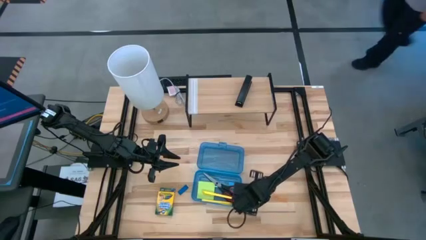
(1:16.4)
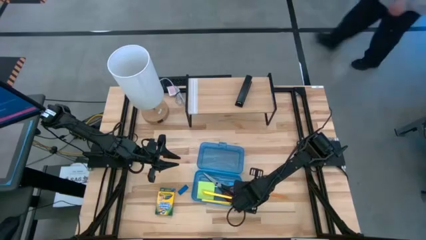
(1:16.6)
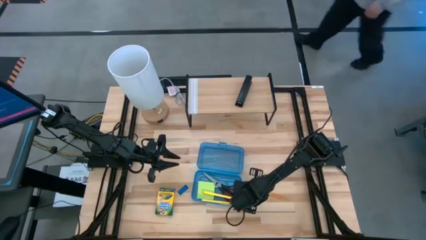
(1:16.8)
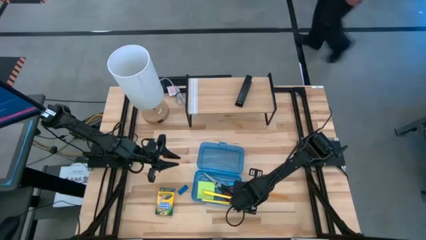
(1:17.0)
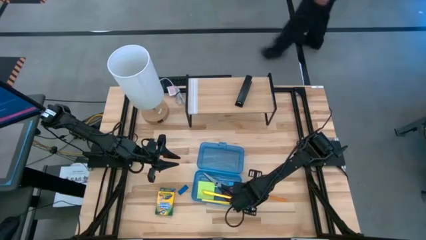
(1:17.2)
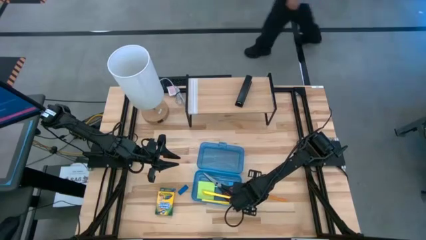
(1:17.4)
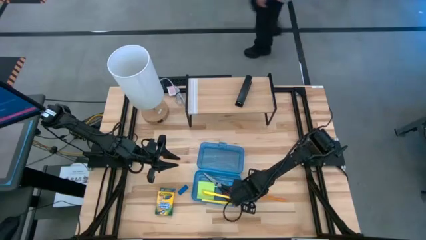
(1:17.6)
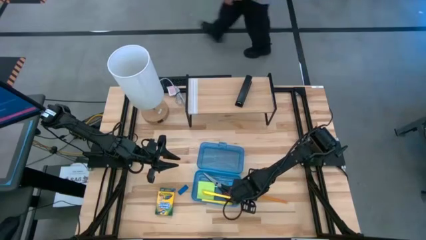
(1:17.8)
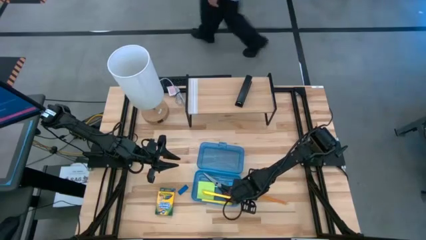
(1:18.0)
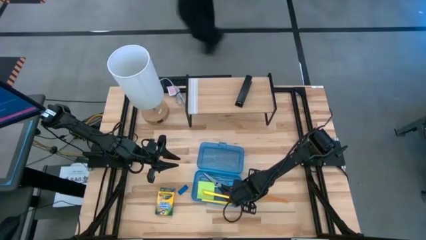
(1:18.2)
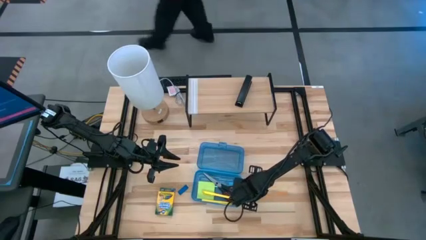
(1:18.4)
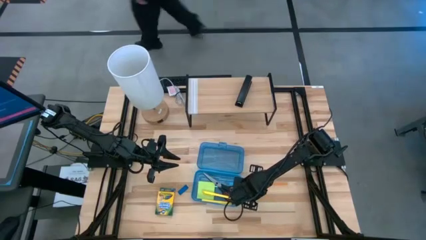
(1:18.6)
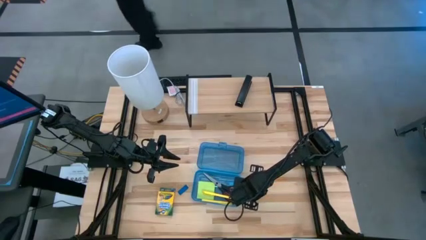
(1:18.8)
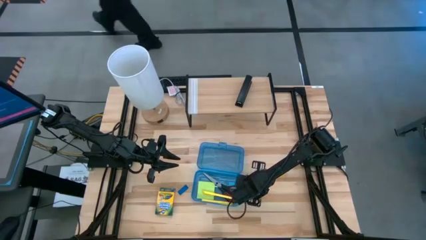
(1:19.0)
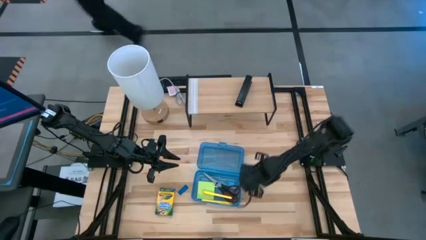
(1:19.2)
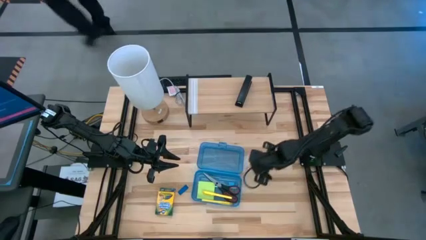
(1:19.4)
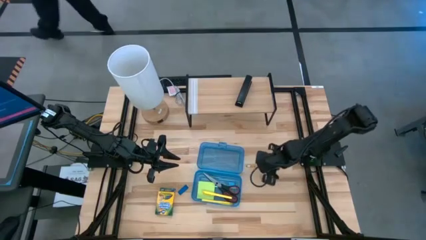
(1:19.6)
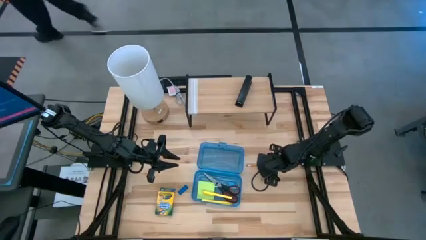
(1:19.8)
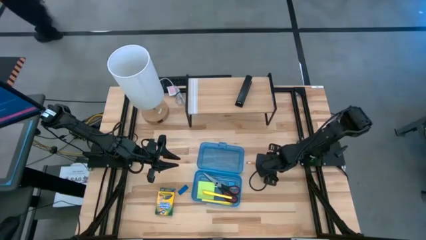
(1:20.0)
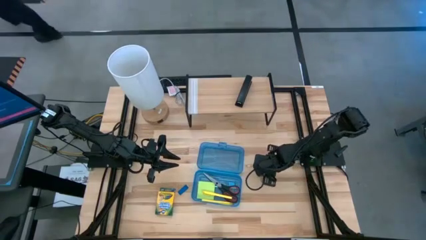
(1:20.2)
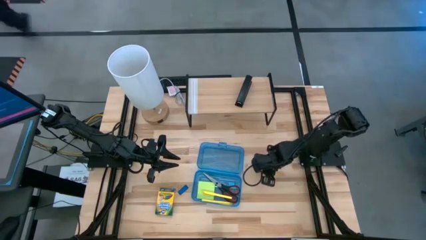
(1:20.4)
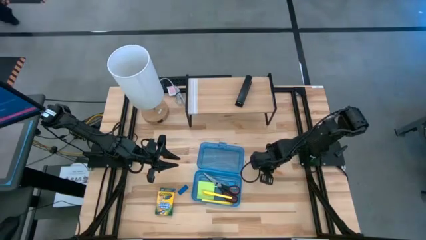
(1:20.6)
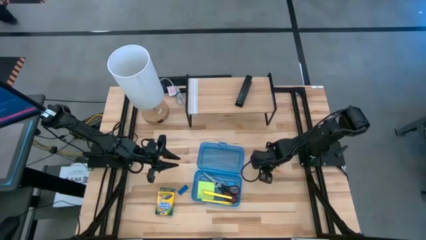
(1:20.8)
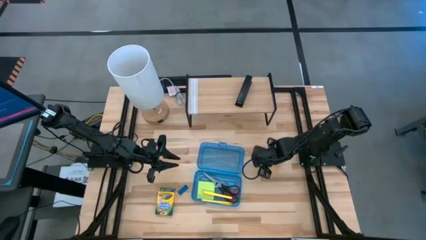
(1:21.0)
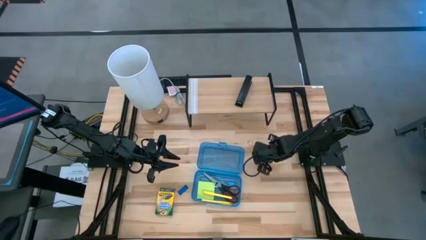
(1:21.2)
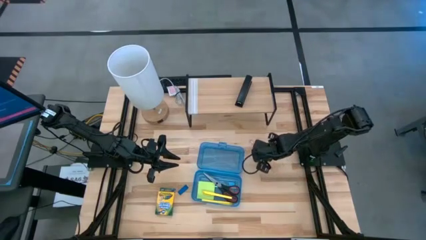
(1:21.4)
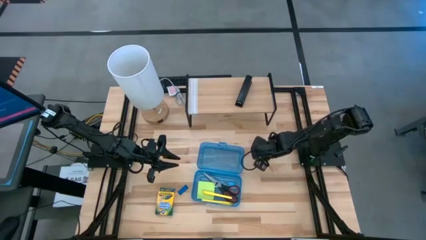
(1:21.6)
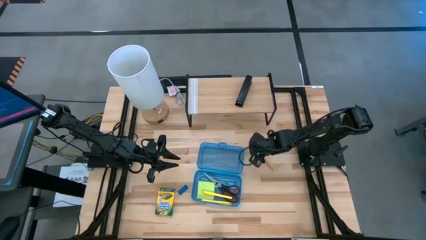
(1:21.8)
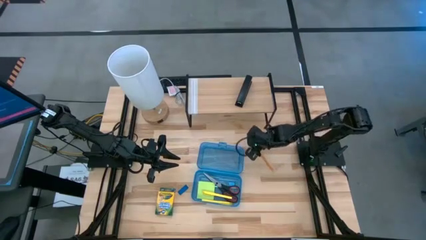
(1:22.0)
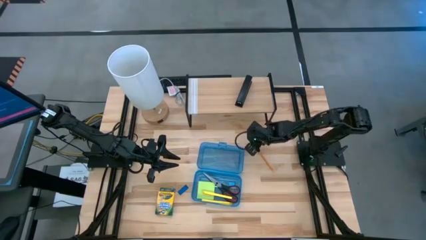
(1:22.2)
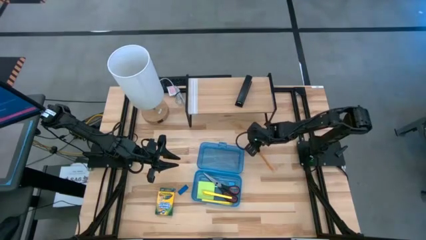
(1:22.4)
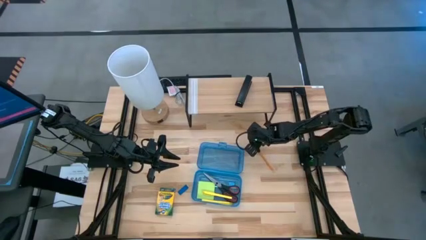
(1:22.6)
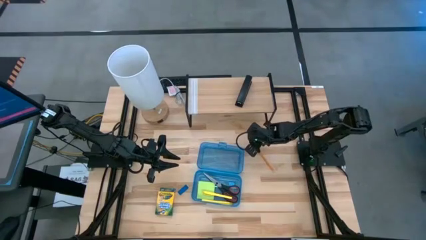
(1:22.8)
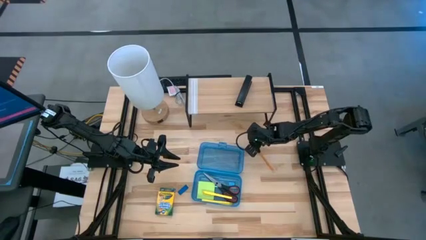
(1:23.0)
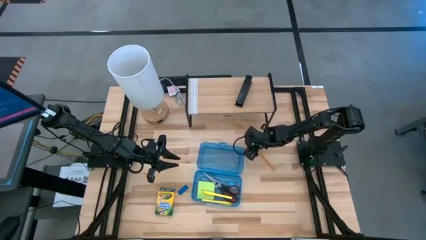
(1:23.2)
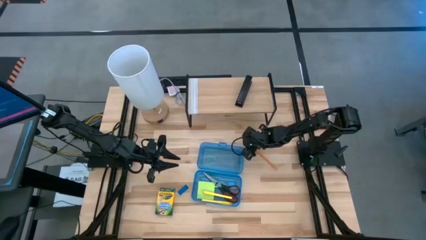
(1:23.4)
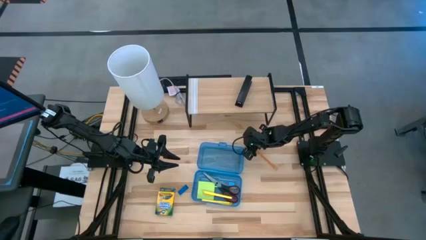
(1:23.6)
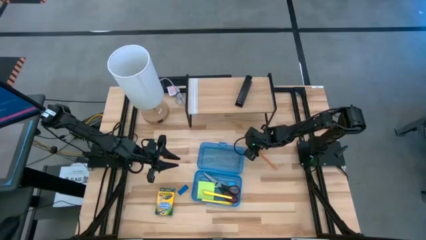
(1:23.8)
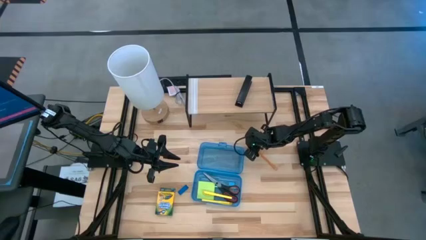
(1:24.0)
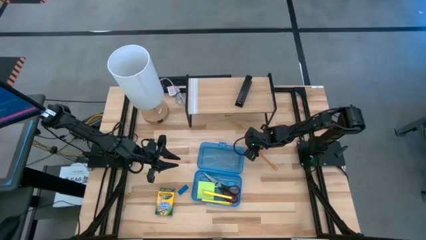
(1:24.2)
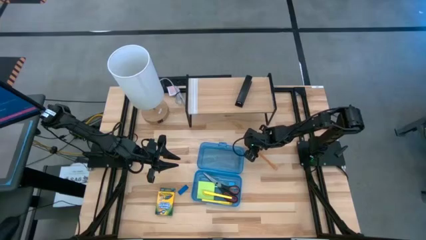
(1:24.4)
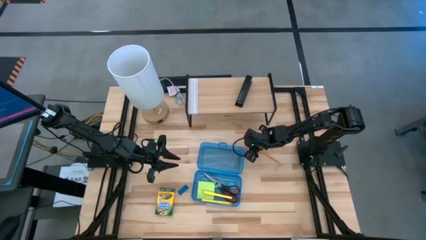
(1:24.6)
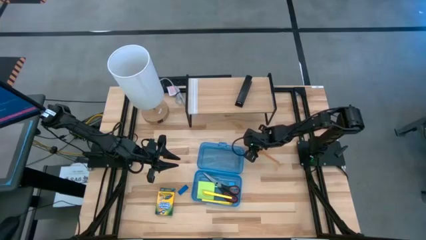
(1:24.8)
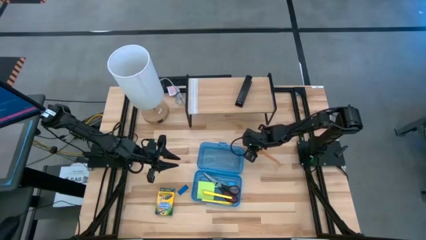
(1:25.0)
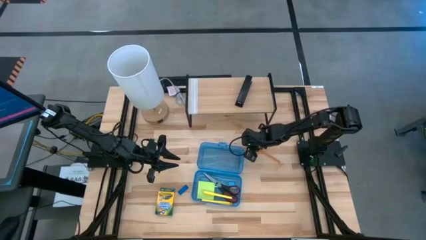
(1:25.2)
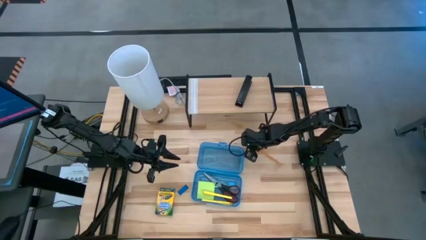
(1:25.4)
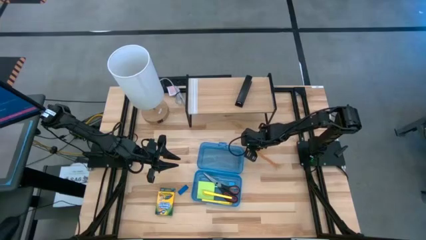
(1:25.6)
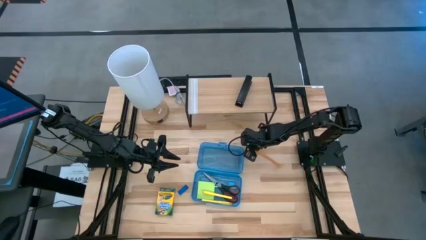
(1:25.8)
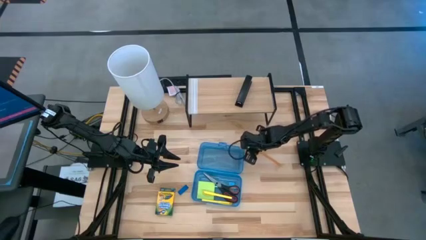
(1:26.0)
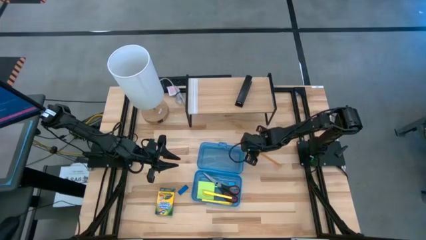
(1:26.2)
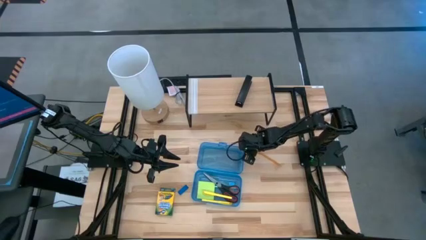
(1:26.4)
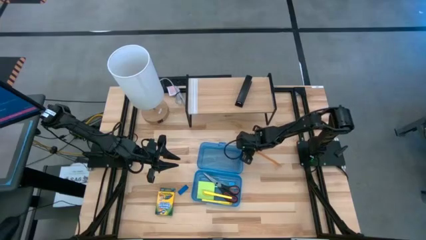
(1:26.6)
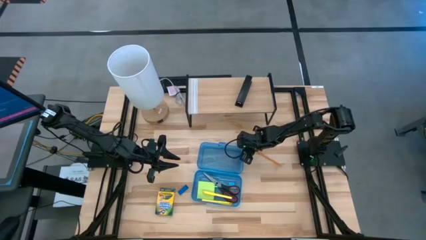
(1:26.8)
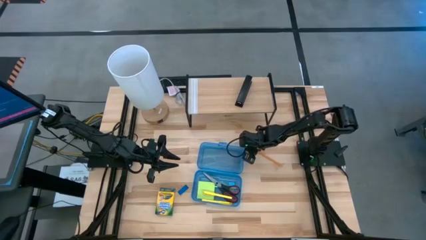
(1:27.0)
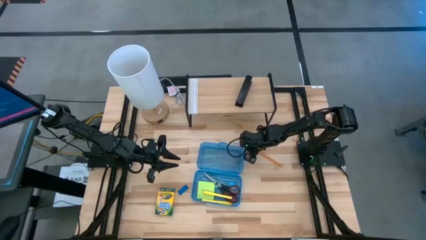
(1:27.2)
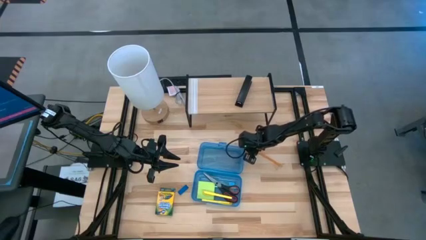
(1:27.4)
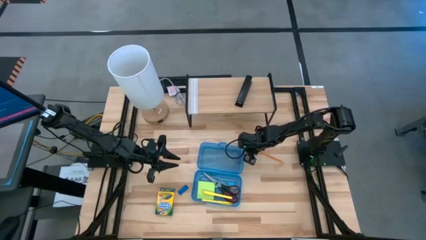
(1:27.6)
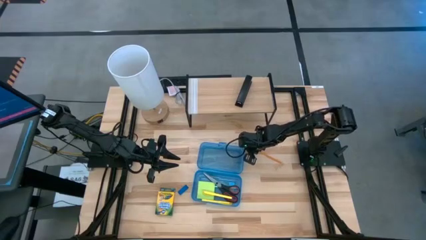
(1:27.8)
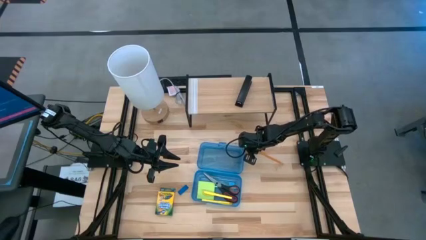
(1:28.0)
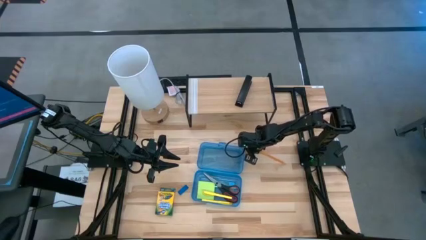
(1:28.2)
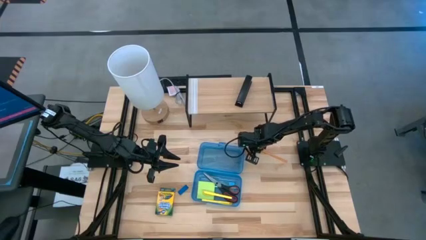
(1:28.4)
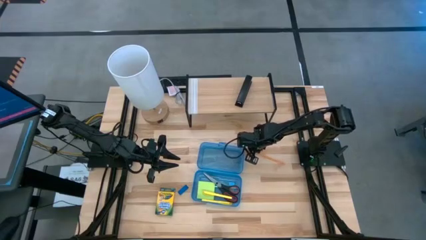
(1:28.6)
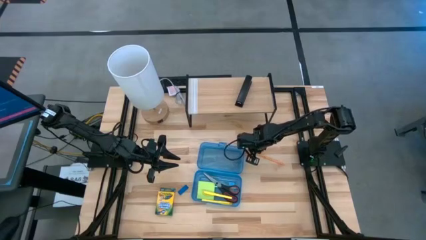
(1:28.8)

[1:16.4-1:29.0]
Task: Pack school essentials
Put the brown pencil into the blue supply box

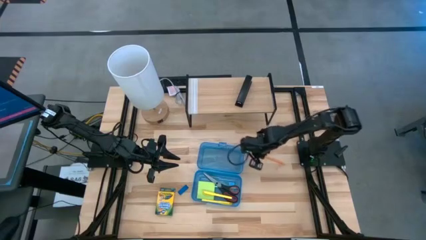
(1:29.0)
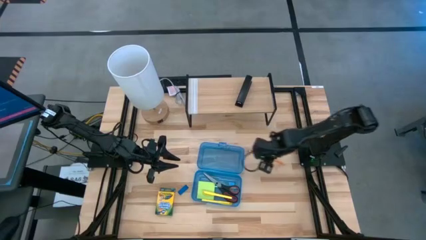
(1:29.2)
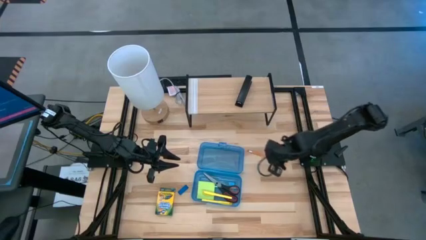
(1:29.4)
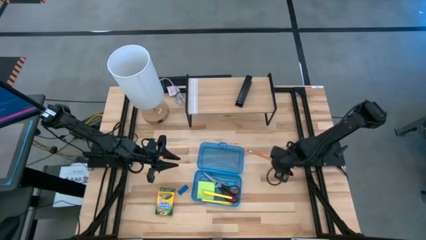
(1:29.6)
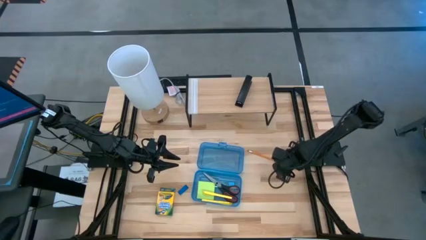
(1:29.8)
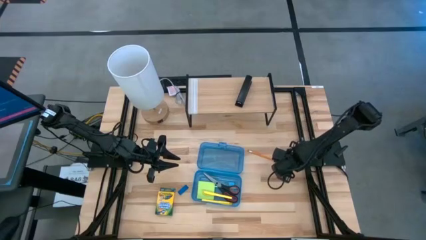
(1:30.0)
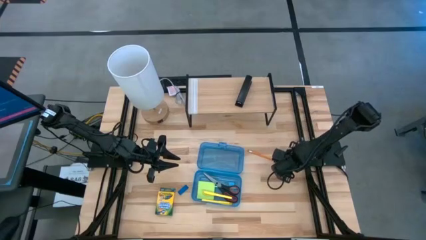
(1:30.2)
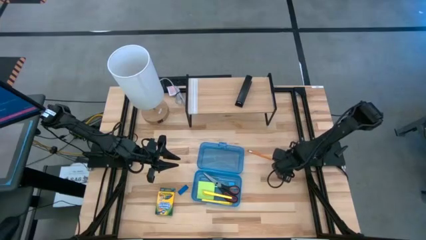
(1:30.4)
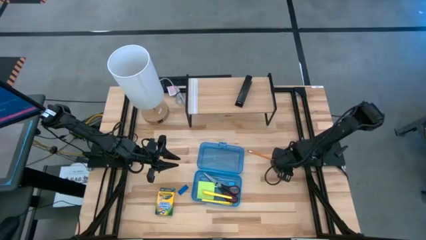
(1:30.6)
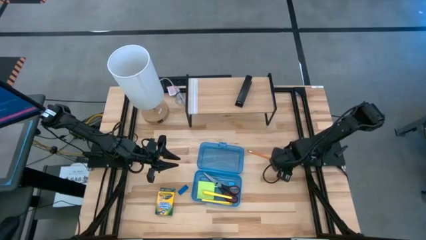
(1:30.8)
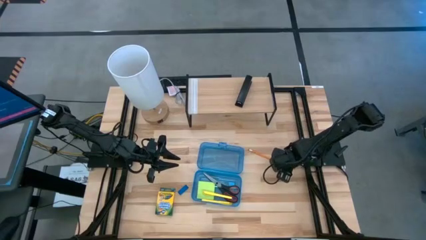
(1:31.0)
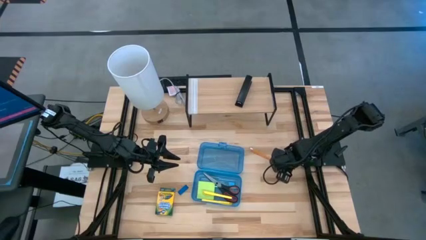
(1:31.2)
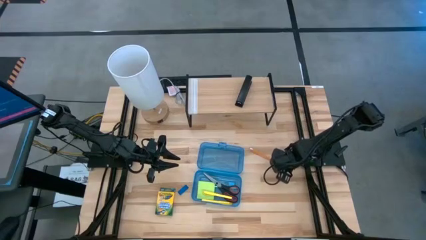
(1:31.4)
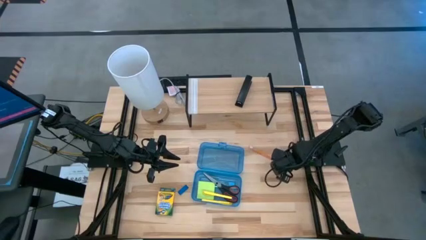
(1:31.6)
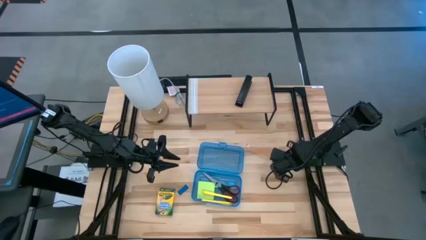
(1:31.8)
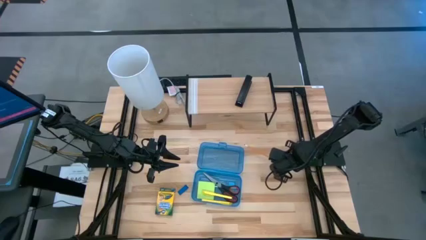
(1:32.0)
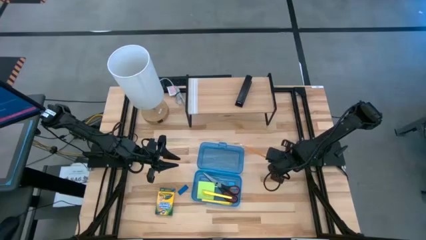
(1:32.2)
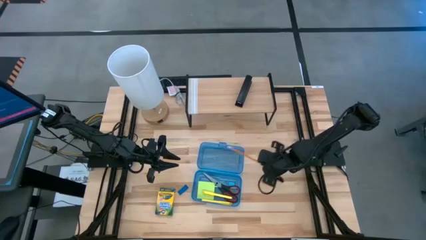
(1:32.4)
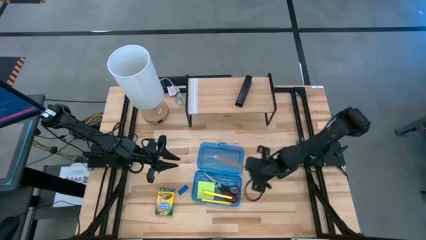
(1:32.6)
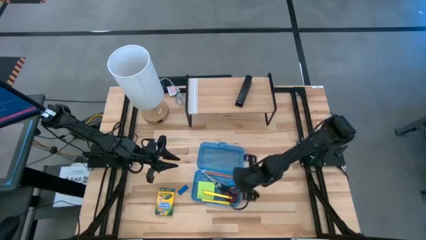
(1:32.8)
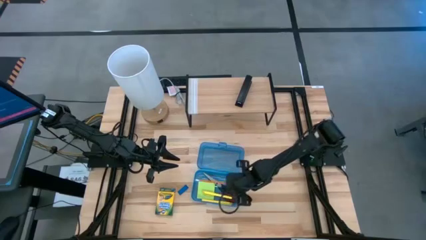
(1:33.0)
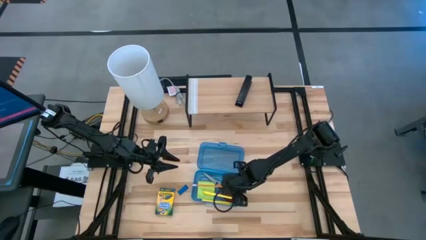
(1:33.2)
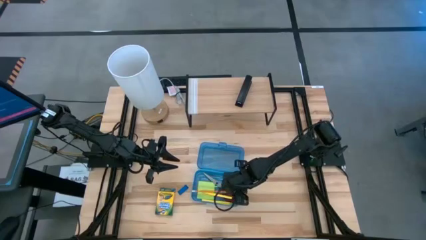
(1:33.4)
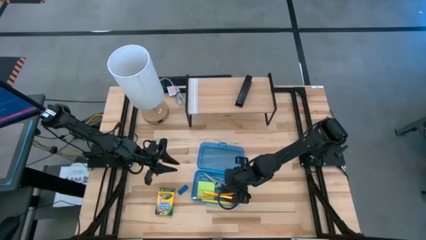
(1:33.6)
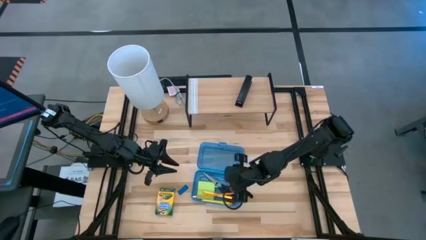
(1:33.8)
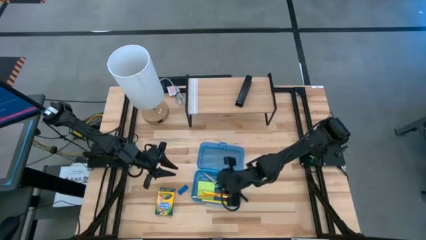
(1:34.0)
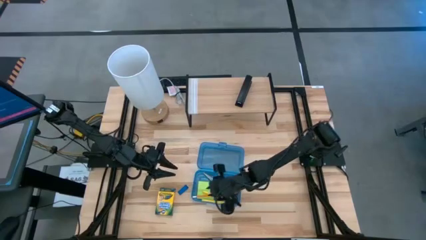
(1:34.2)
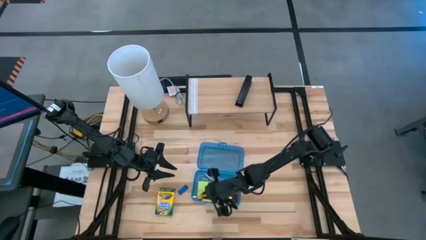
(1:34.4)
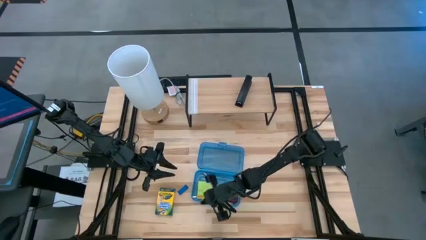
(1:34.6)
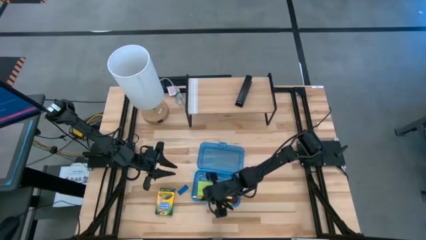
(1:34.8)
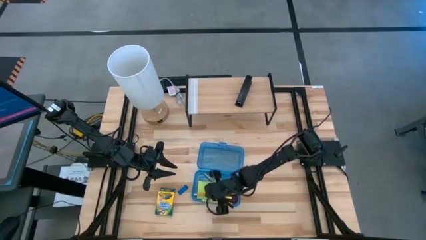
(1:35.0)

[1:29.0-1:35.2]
Put the brown pencil into the blue supply box
